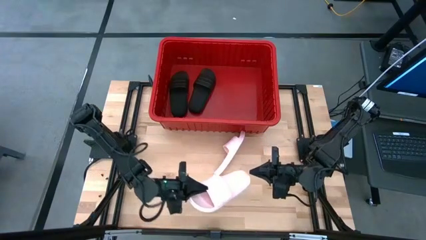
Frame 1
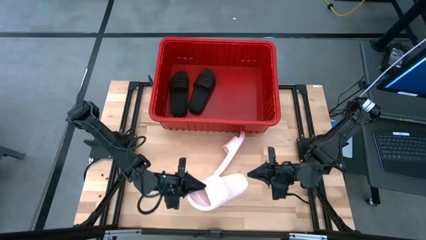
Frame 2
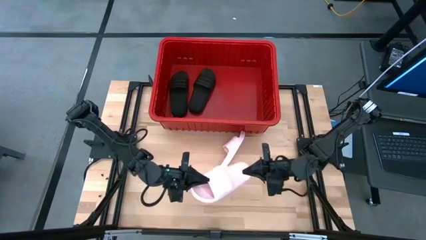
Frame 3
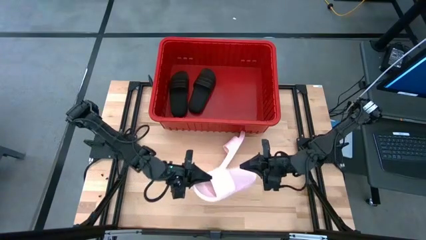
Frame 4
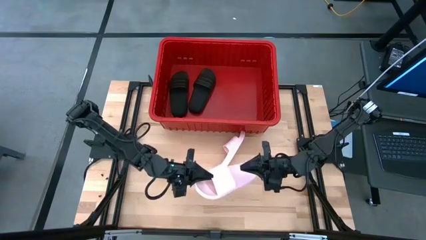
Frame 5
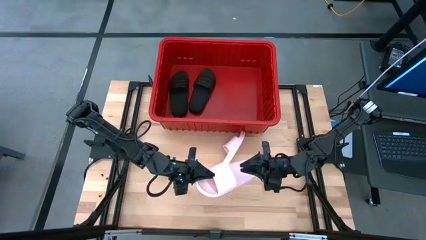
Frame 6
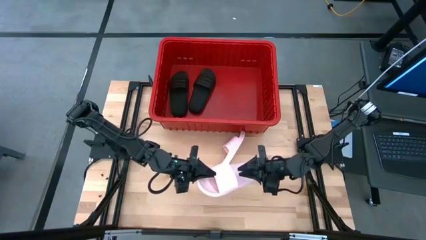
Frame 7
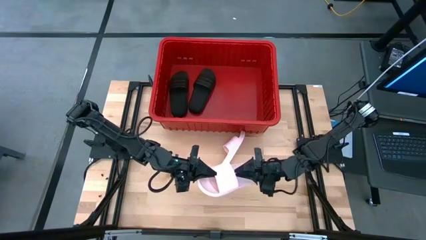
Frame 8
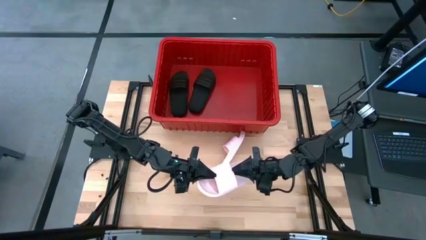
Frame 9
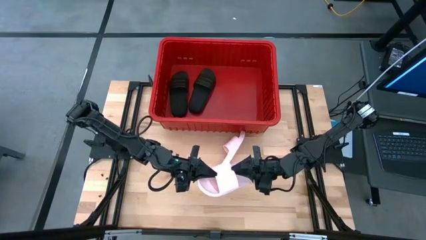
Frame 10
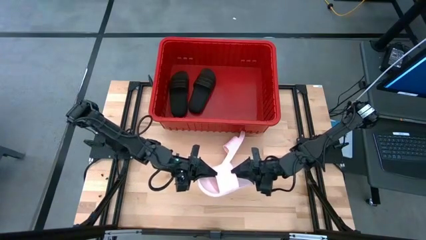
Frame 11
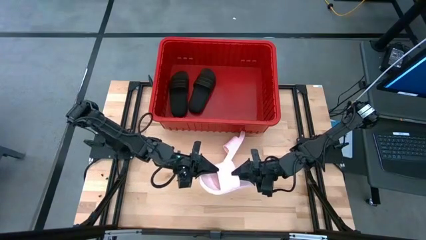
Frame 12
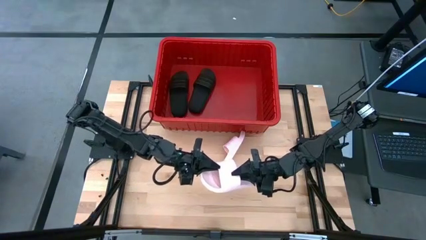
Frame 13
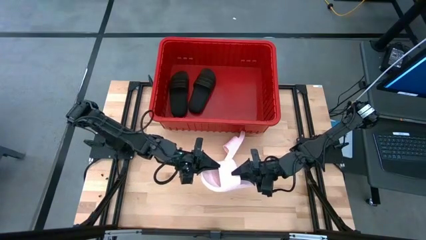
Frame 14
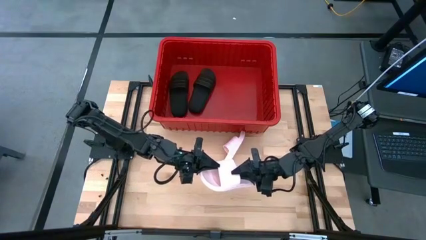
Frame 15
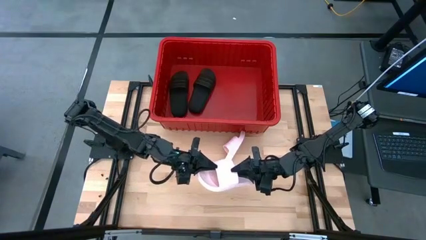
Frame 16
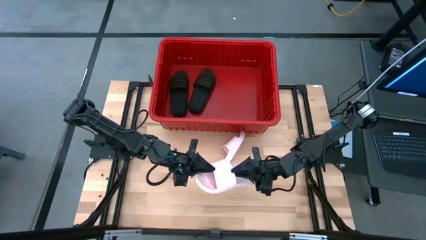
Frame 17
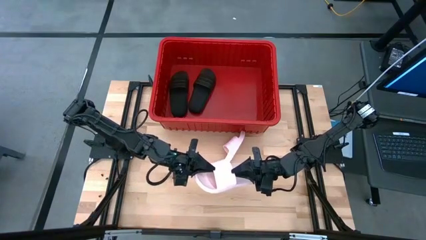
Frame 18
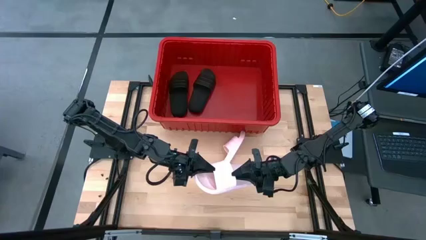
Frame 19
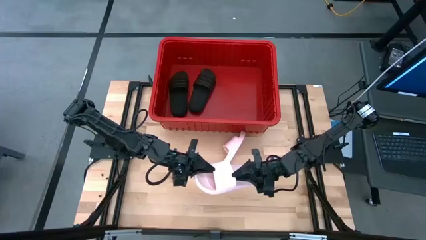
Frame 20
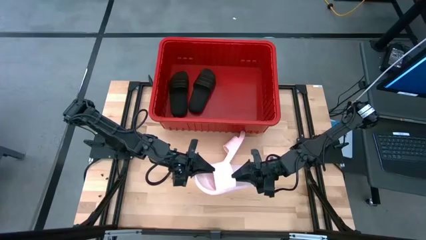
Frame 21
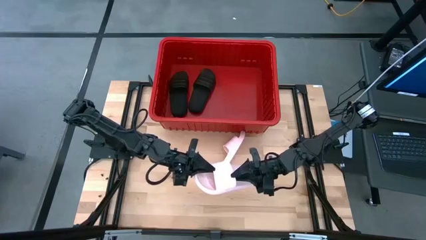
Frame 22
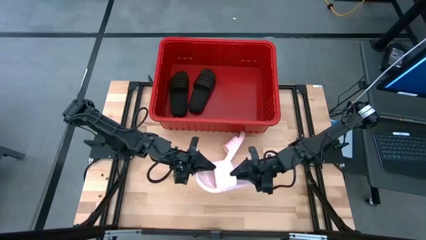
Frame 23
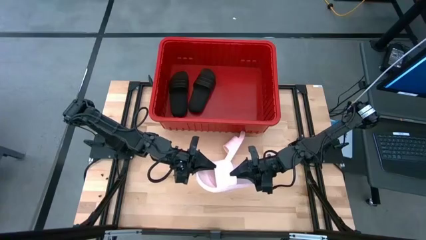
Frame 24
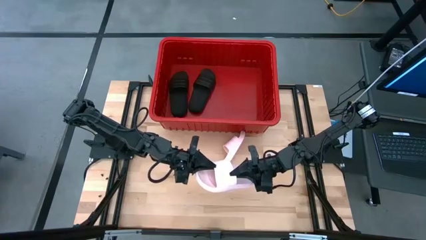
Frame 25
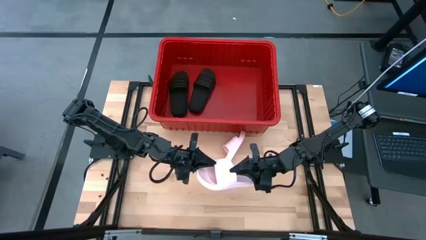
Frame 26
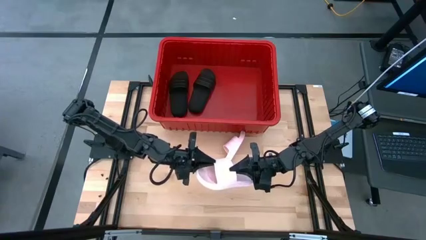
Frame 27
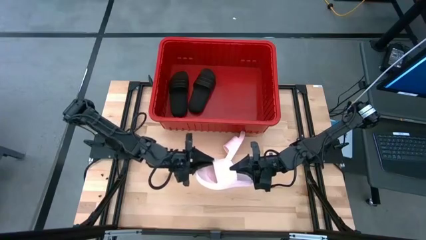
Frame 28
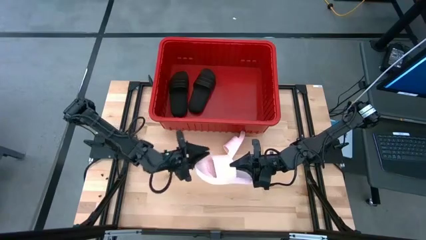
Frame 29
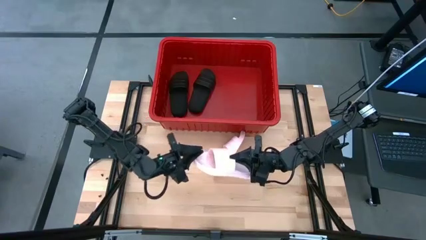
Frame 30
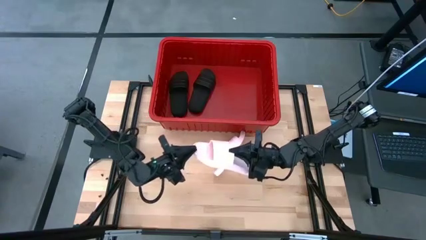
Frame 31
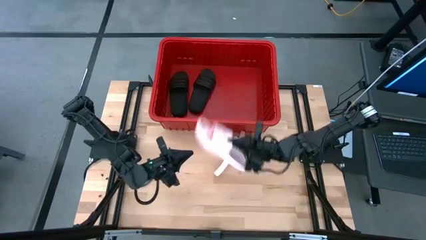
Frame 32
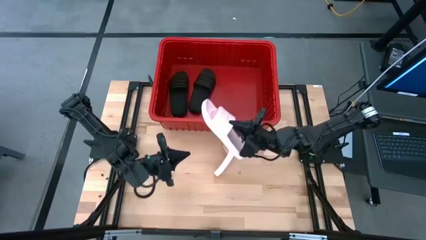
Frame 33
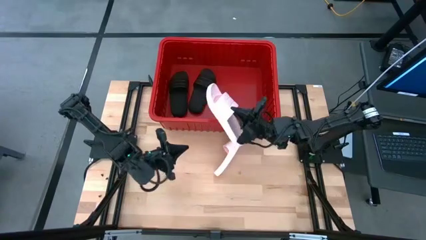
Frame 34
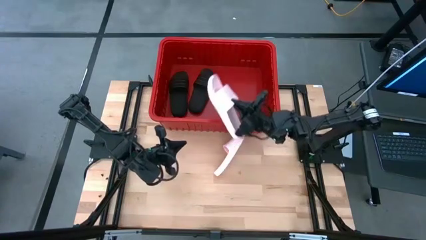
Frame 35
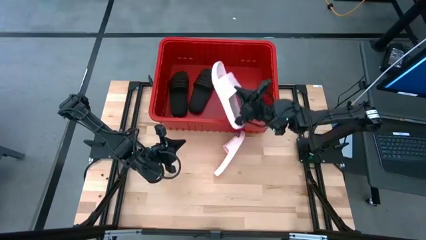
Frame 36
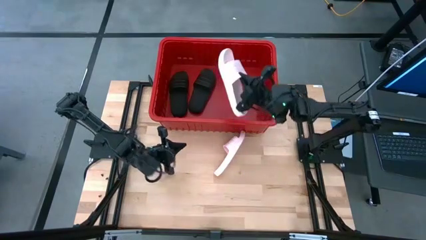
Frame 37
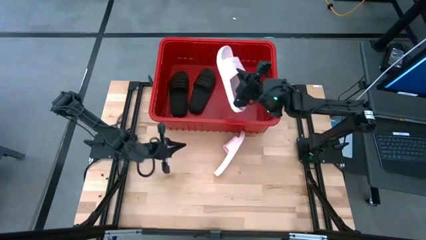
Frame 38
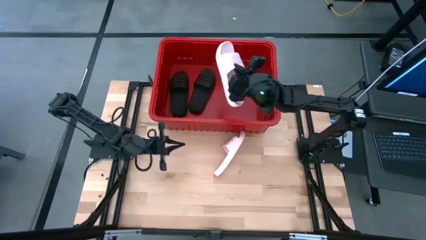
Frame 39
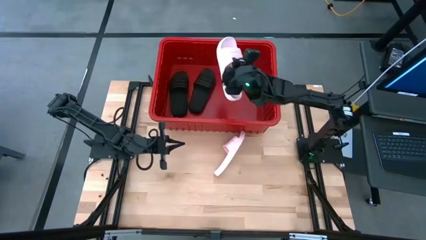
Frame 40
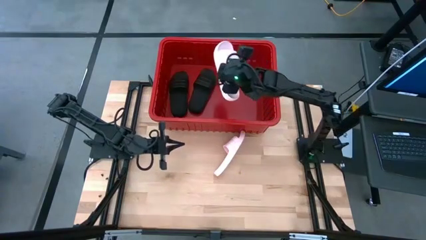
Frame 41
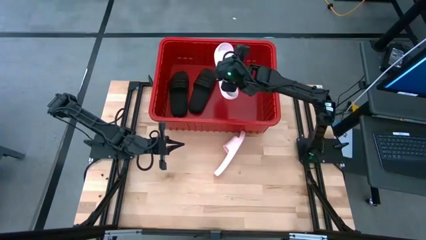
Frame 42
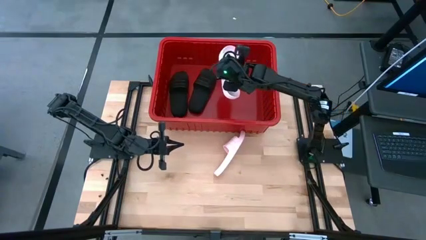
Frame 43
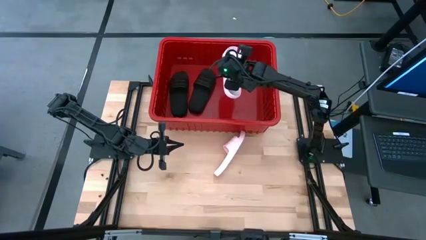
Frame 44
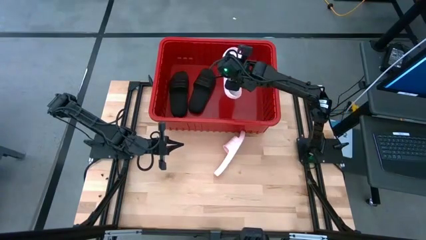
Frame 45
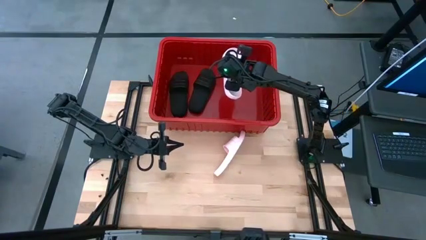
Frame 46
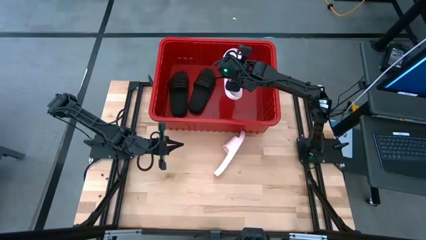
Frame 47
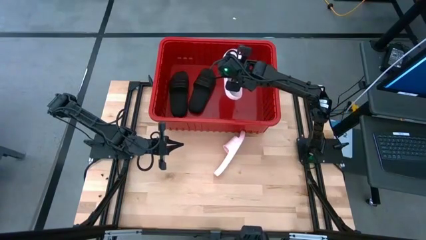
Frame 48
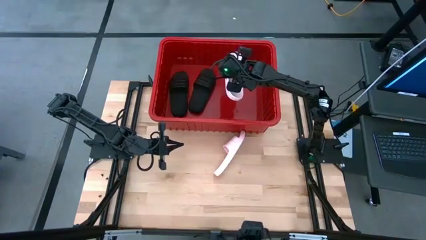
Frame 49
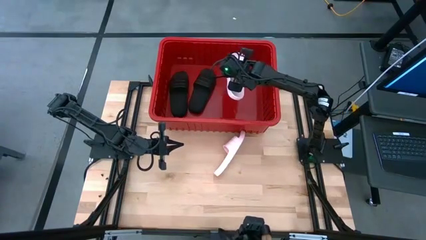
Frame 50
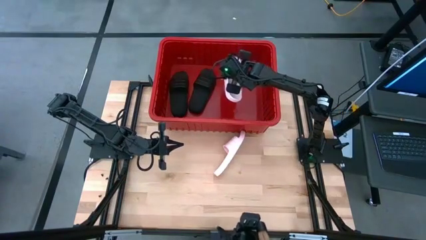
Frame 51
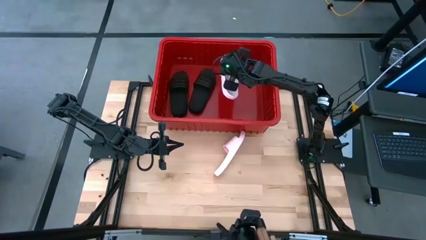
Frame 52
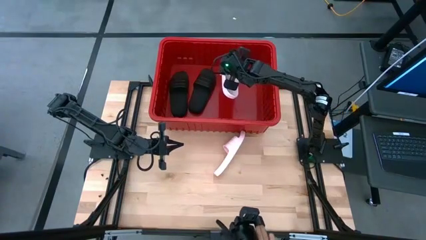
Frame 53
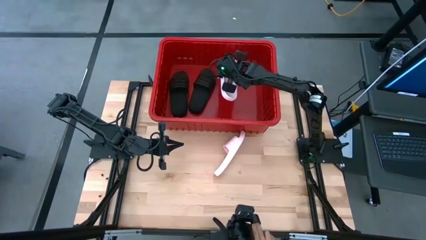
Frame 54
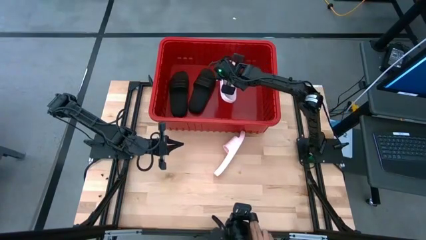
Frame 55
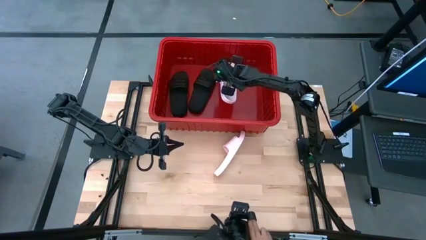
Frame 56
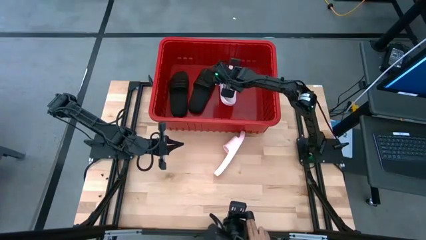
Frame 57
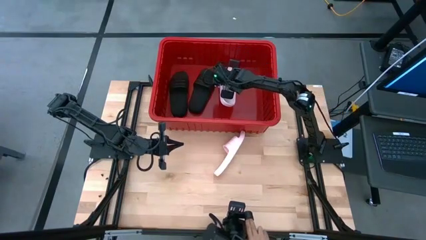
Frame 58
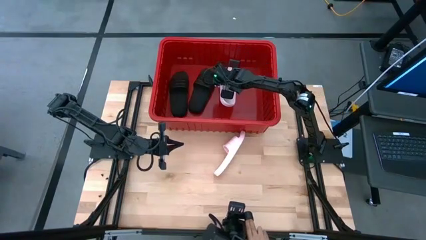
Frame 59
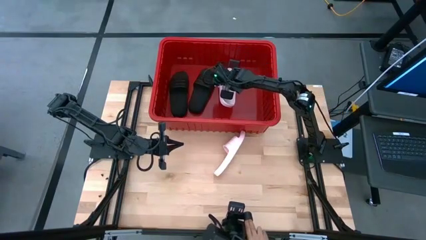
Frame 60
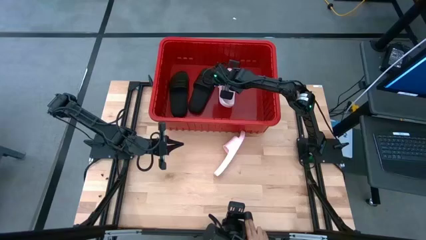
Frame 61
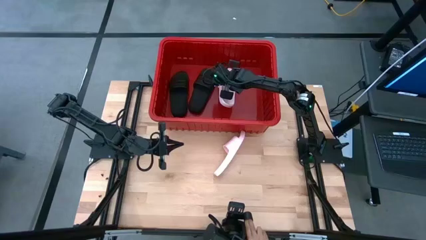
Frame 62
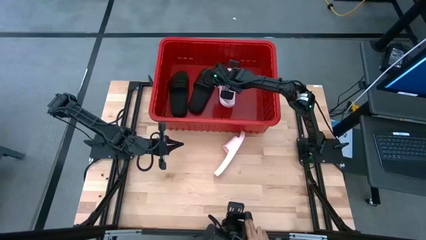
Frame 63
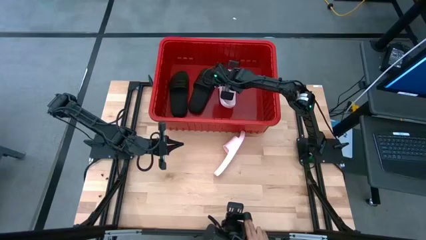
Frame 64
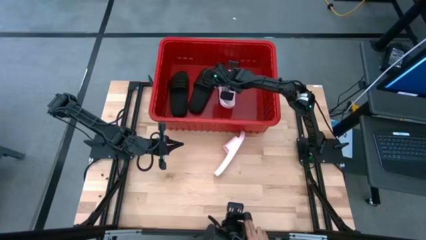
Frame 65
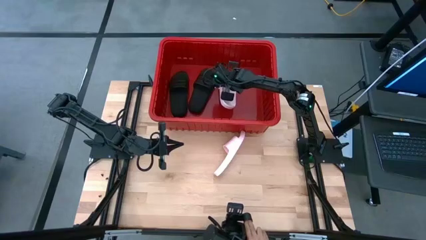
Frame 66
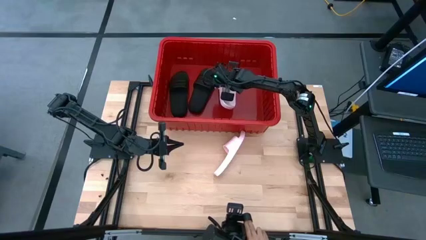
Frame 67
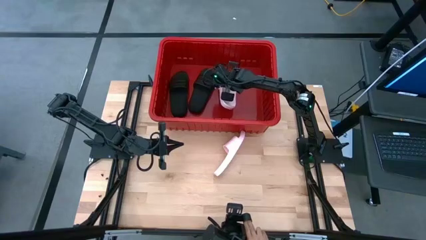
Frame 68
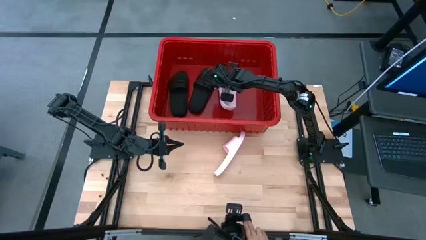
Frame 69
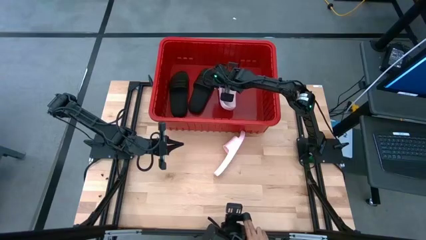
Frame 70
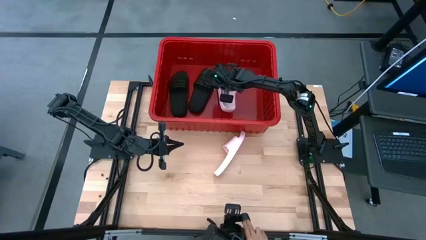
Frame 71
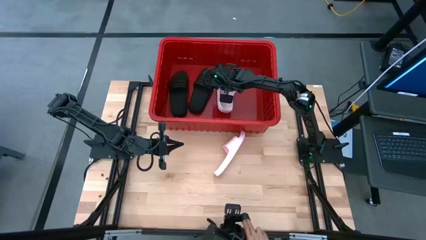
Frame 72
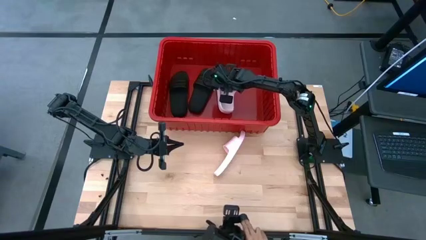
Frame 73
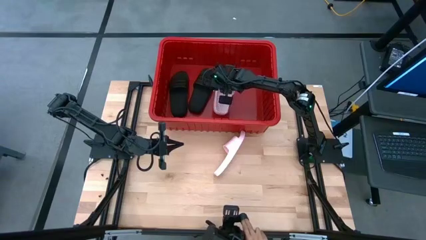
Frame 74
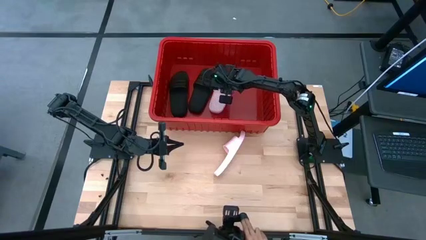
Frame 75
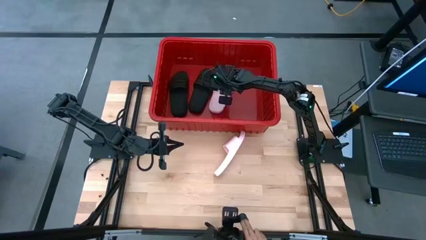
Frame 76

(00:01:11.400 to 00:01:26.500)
Task: Pick and place slides into bin
Put the left pink slide into the red bin

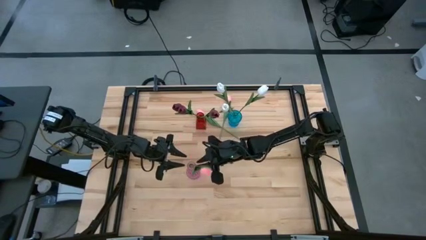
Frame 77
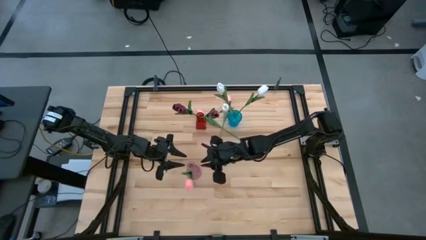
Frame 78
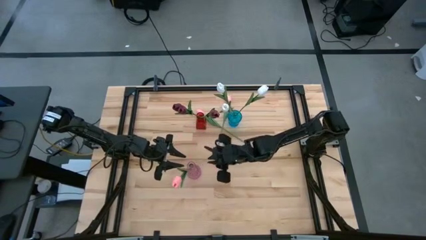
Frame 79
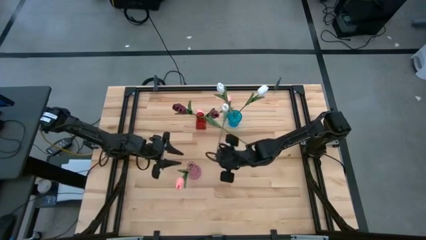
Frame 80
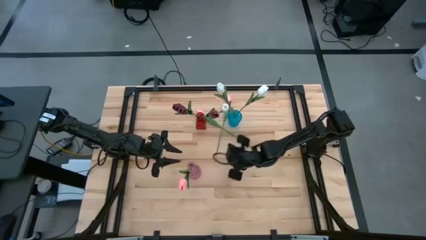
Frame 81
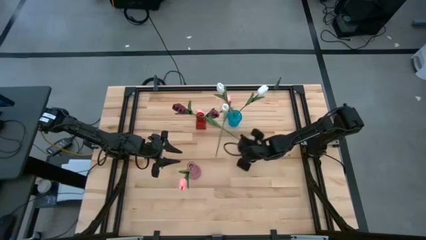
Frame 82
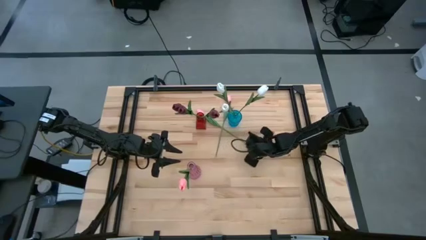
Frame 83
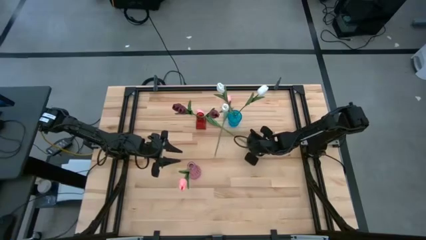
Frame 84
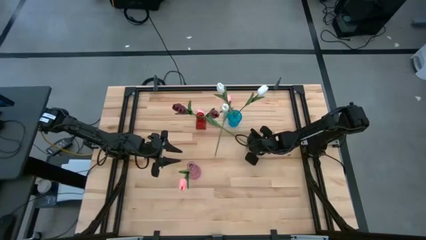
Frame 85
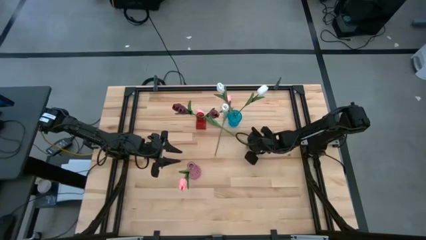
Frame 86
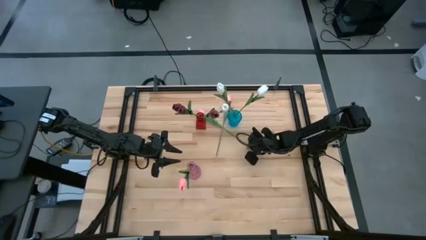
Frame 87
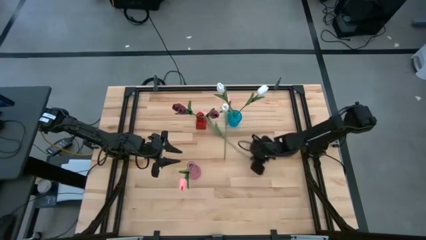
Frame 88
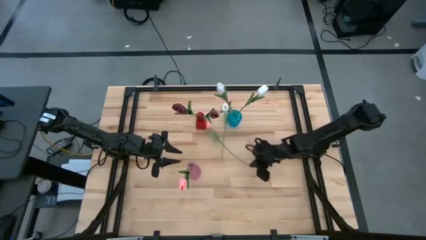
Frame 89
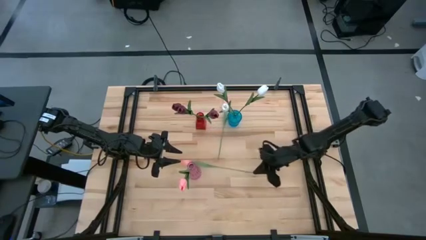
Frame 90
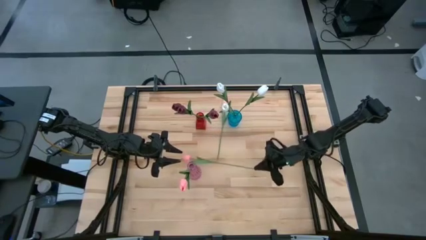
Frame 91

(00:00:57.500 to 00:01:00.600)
Task: Sort flowers into vase by color
Put the left pink flower into the pink vase
